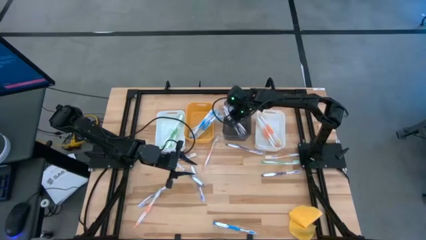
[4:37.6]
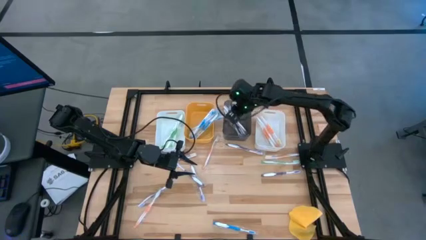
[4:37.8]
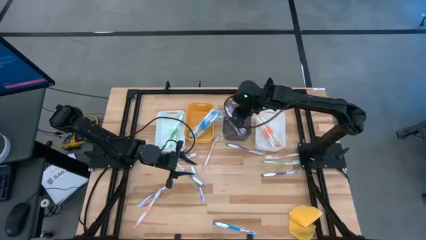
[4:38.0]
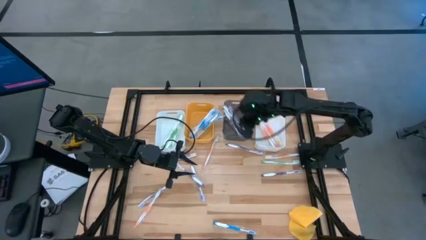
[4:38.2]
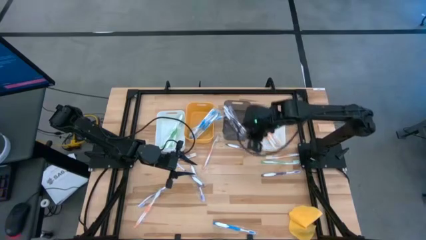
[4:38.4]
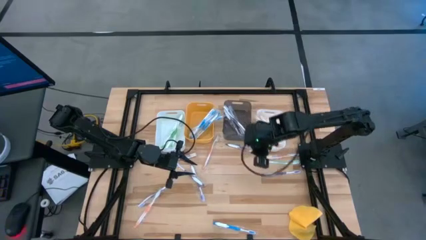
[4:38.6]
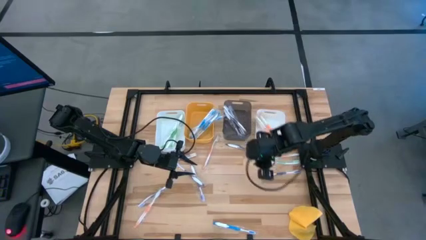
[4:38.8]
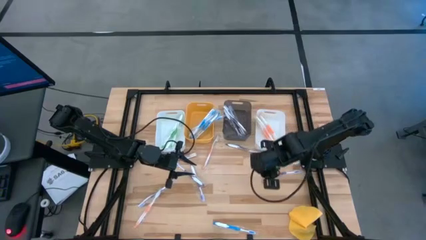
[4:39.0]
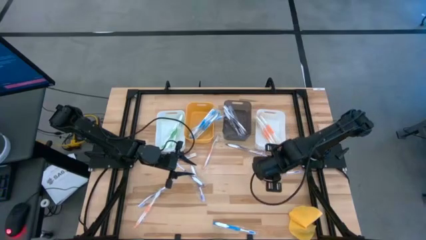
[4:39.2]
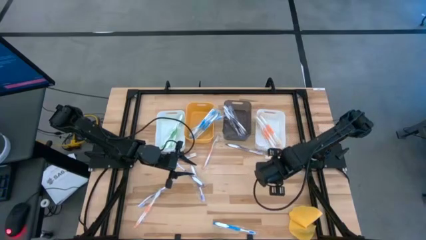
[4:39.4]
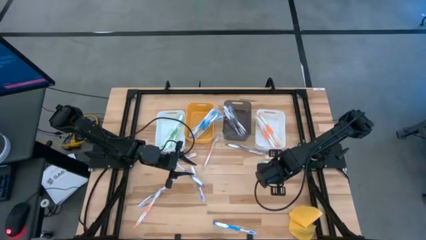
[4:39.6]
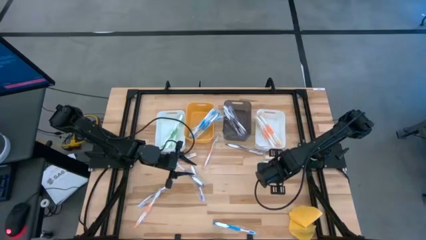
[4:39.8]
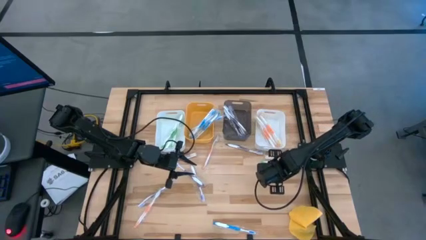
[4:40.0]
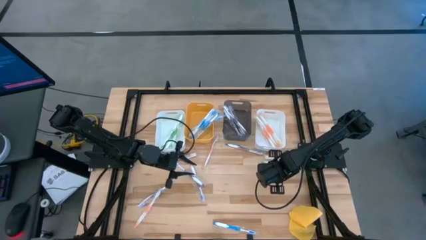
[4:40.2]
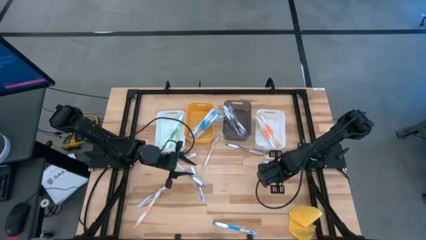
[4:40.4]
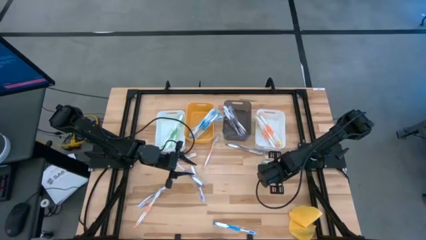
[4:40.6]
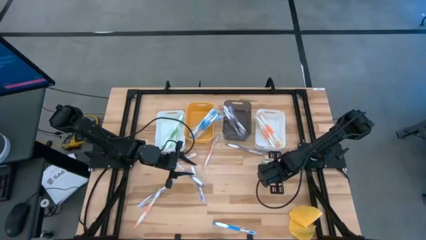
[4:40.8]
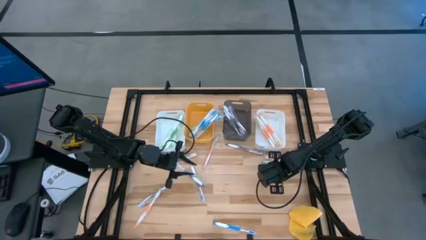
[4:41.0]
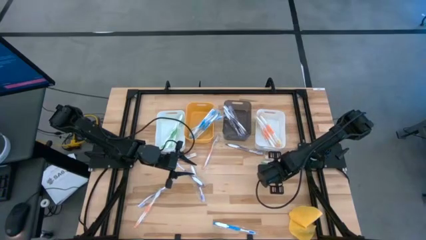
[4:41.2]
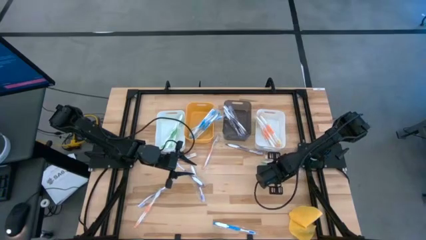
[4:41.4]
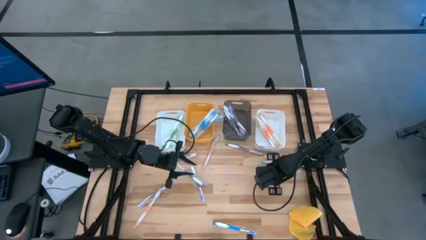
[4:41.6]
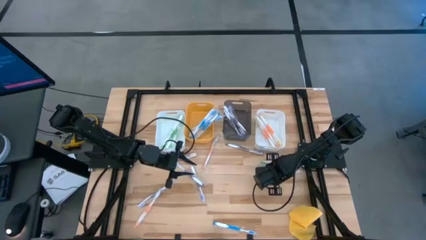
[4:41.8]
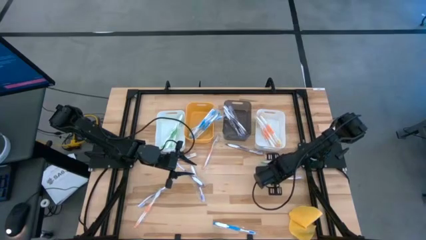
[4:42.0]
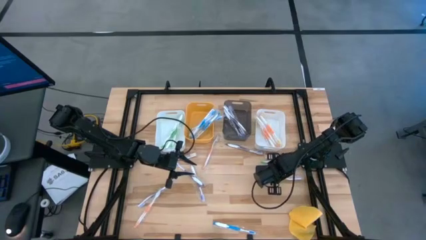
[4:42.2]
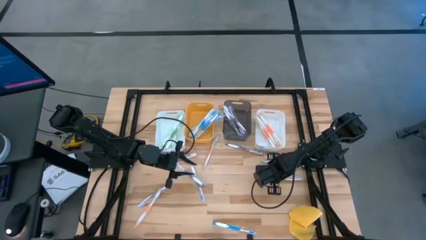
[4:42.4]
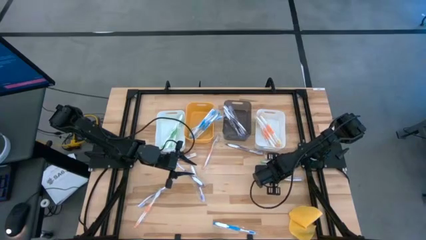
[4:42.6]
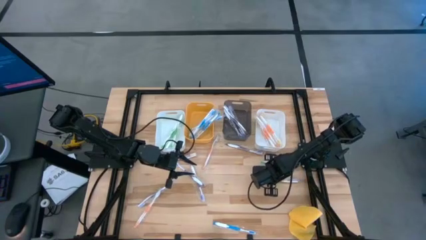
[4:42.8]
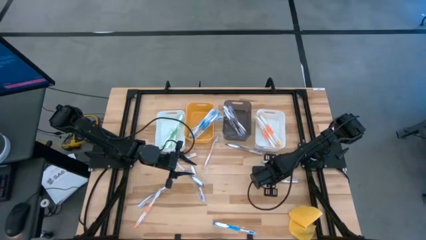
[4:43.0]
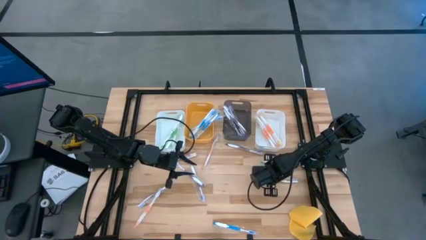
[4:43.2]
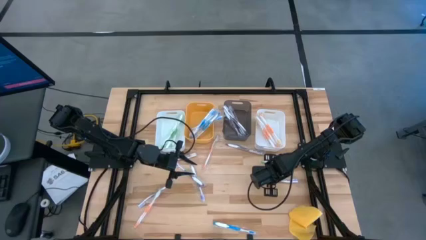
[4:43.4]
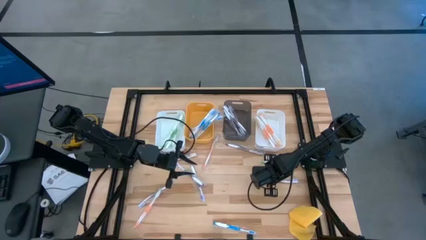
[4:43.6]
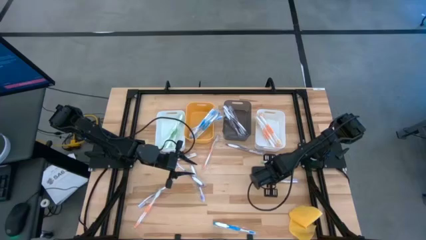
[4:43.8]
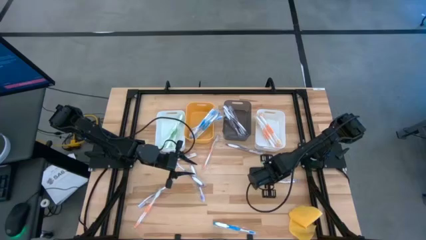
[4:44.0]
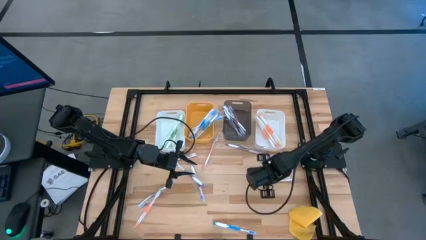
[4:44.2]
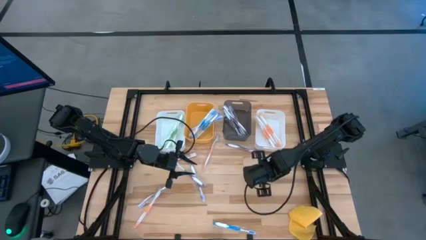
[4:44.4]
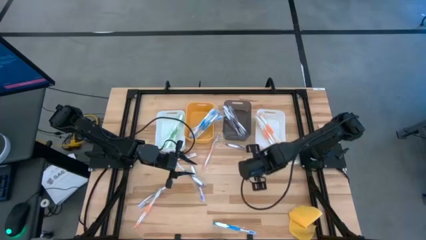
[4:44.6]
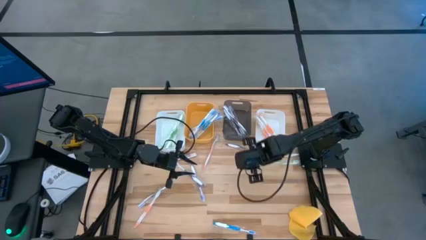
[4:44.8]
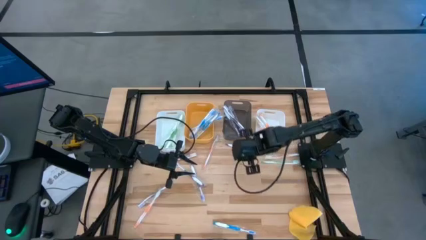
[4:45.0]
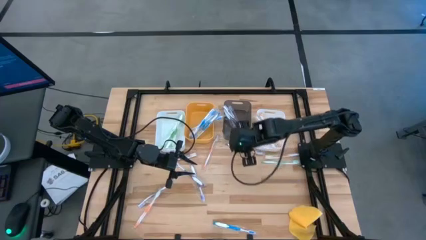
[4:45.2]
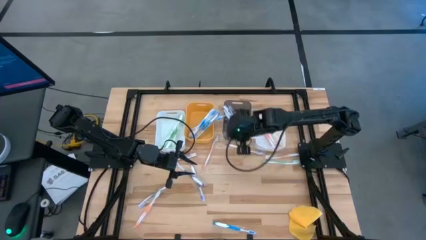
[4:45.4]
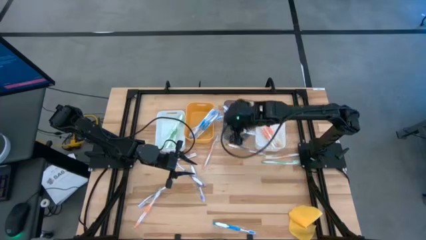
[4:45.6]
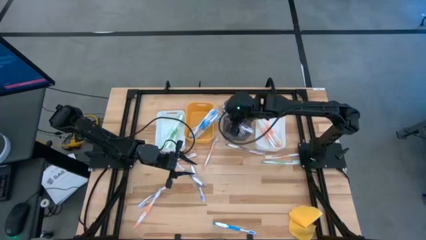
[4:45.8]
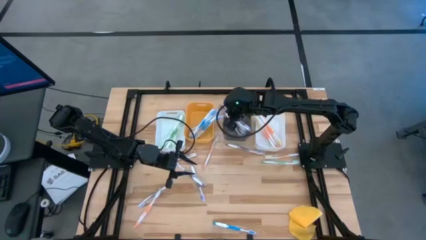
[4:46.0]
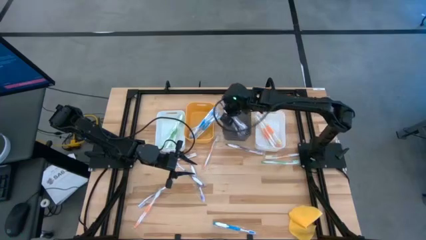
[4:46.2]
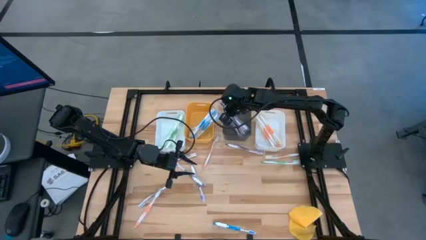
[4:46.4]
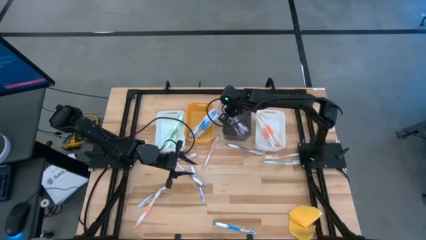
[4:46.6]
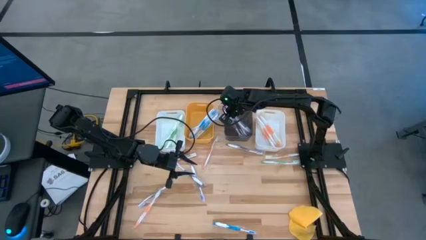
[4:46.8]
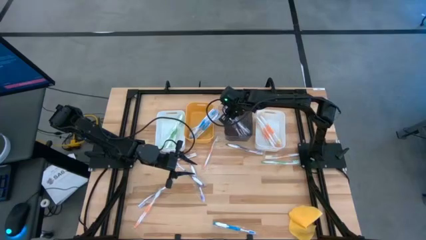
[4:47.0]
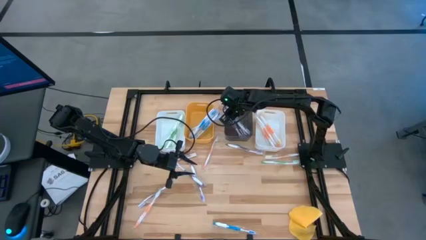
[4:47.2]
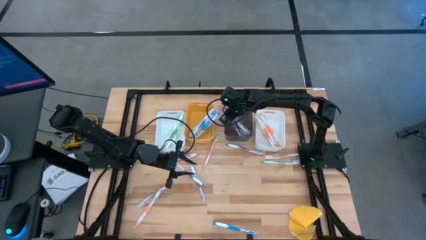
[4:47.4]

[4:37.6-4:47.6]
Task: Pick & Place Toothbrushes
Put the purple toothbrush into the black transparent bin

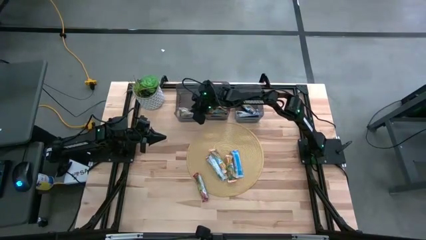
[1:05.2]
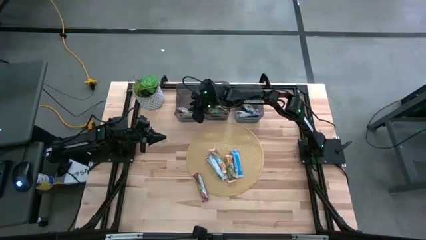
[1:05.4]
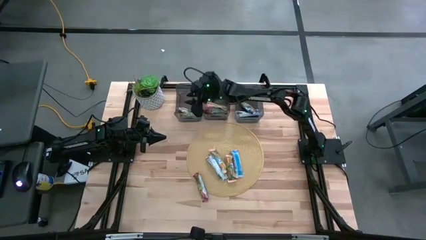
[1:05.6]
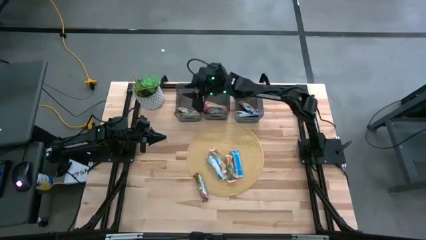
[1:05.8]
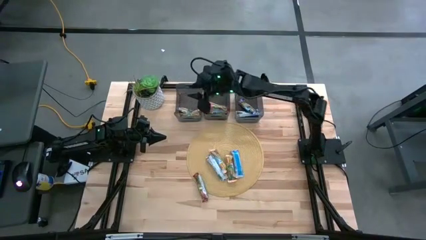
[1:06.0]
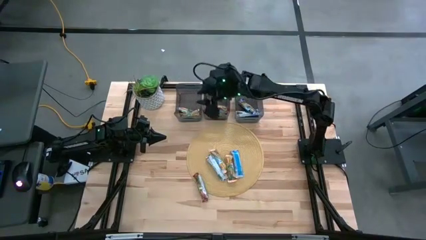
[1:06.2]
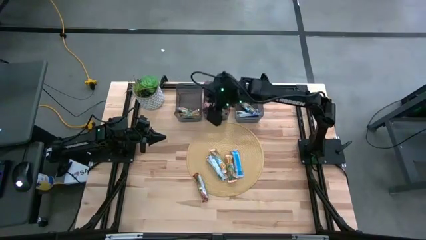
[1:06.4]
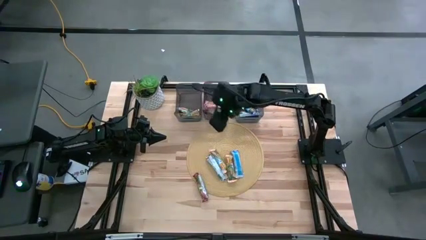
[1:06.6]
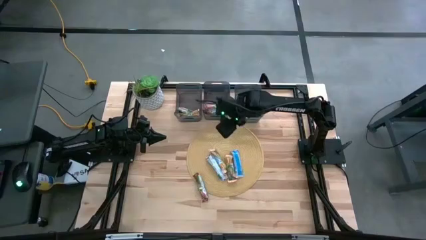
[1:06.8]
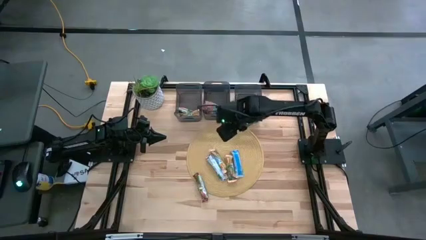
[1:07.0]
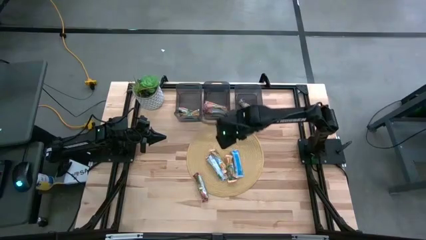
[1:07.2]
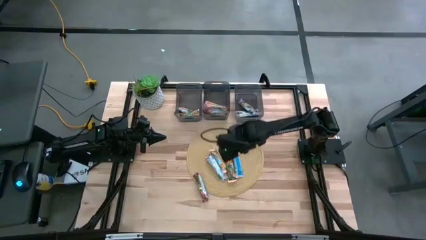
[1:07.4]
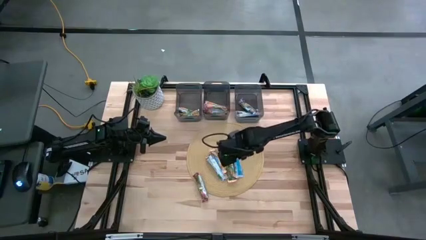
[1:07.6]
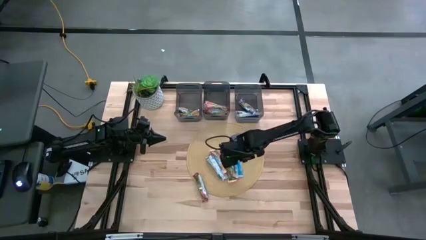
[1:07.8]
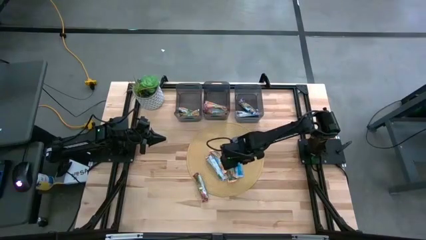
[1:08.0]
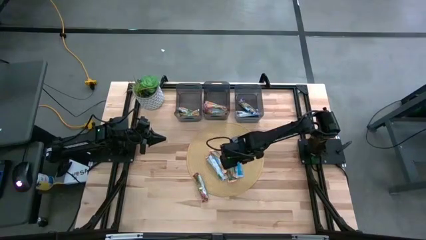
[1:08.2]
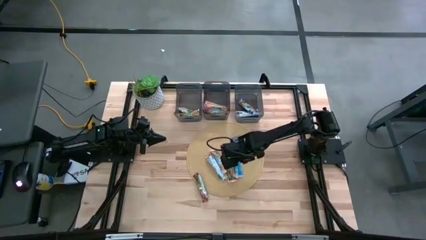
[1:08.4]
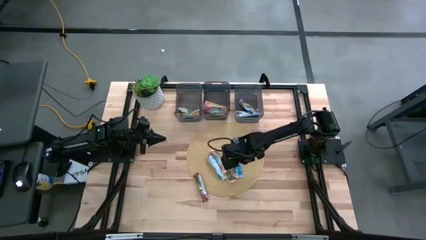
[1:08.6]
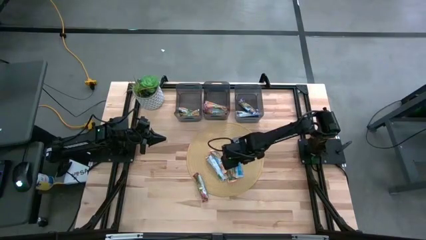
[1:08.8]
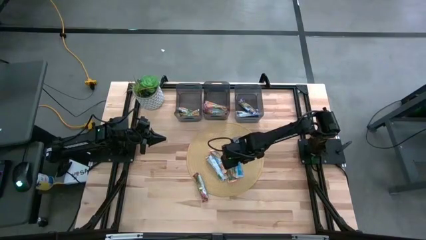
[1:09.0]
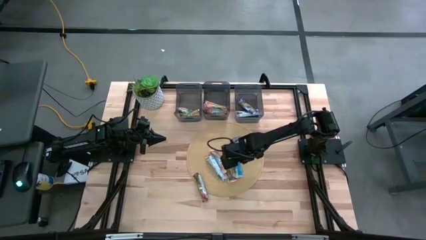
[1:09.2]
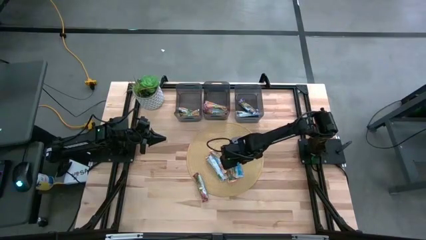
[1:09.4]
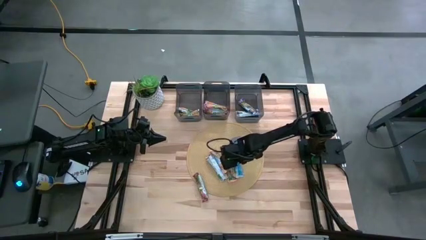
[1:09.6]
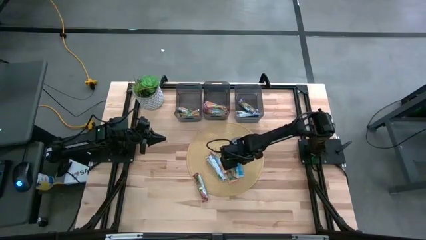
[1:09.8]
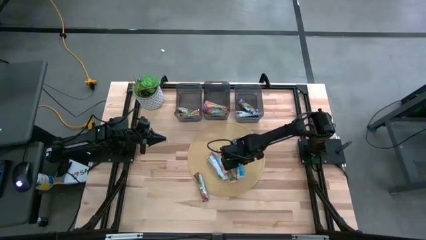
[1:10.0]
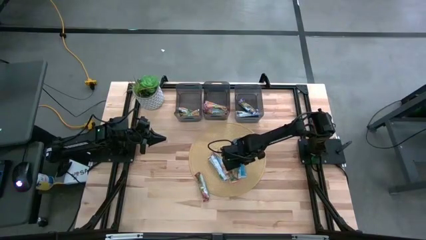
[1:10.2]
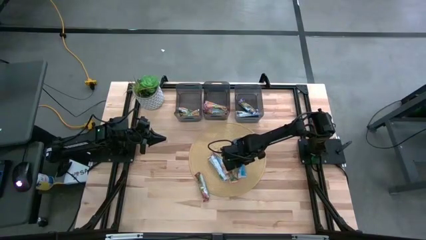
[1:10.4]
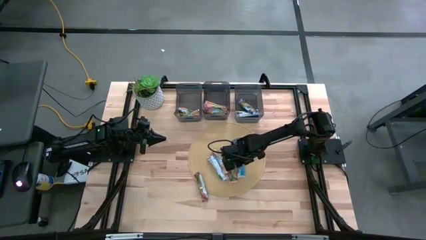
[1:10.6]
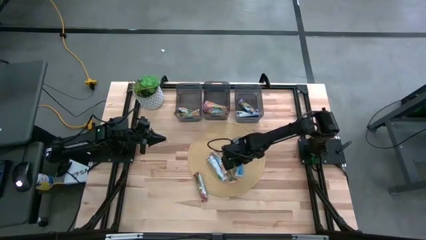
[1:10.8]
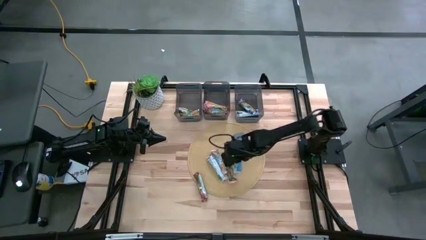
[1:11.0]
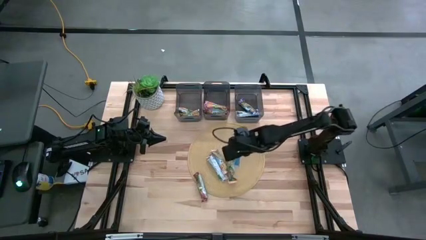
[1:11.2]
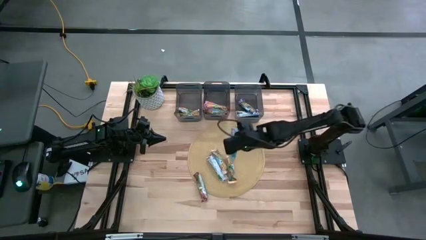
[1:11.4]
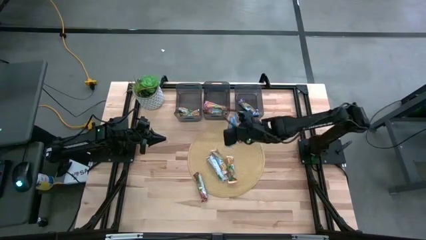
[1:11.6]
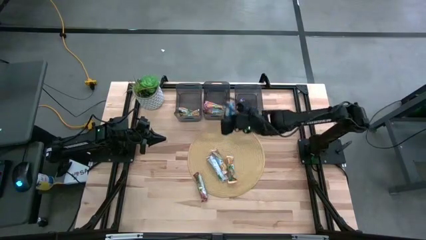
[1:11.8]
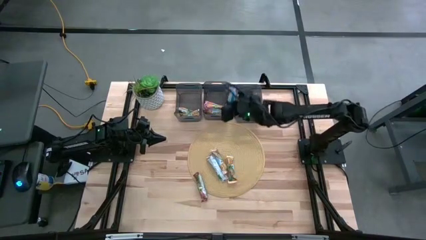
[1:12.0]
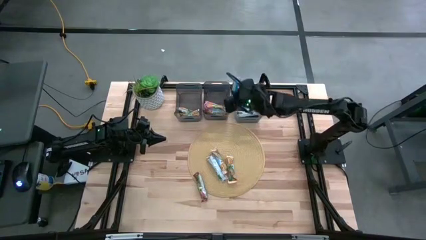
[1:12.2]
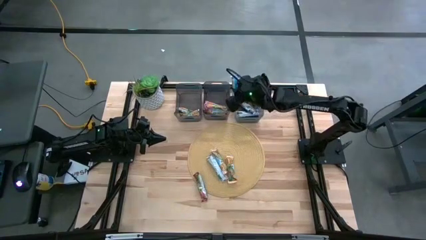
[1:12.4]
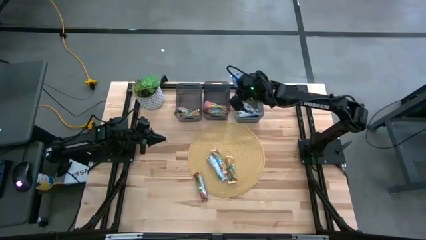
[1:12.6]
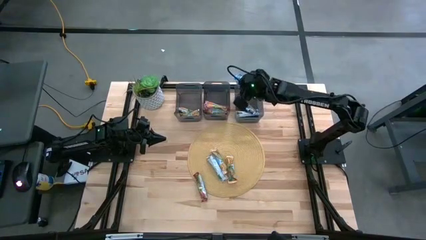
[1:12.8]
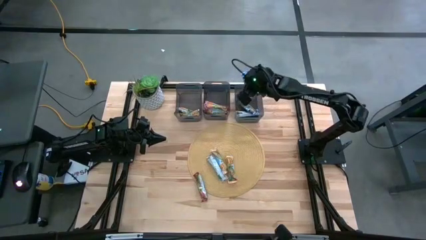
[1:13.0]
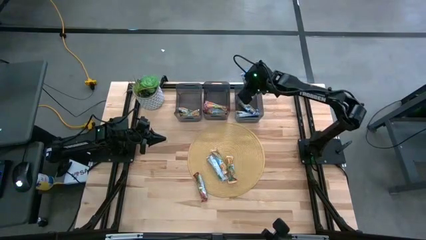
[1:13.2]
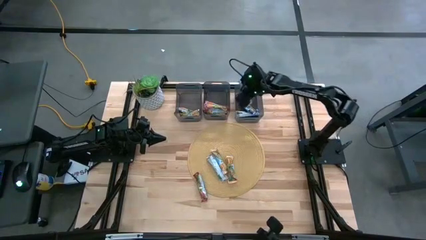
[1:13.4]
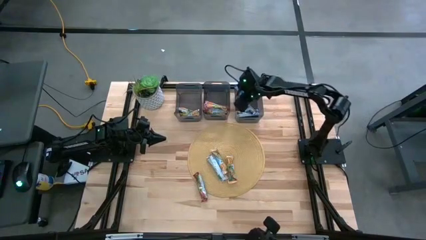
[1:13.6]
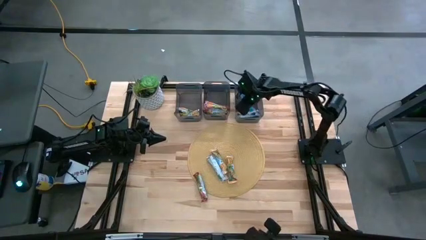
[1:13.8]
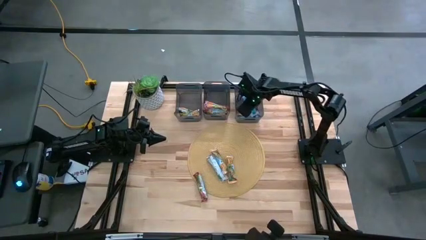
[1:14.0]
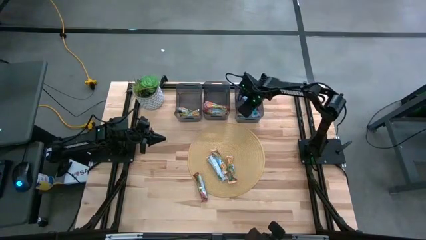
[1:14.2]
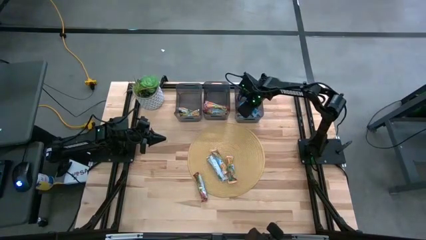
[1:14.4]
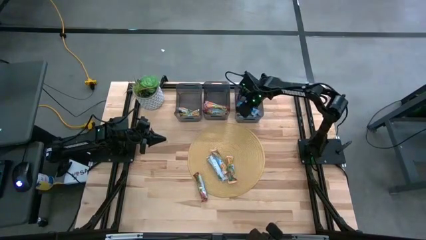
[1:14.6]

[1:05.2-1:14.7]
Task: Pick and place Granola Bars by type
Put the blue granola bar into the right black bin
